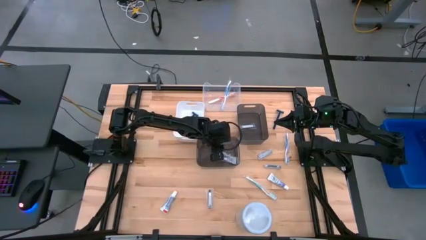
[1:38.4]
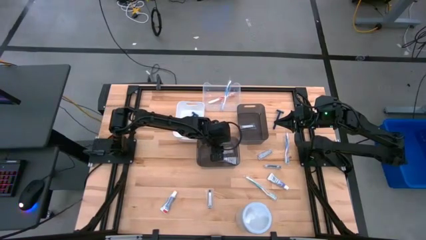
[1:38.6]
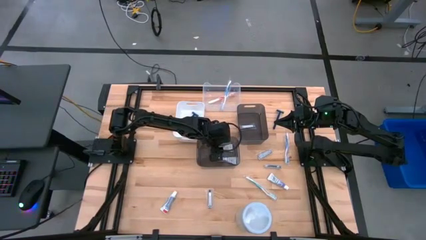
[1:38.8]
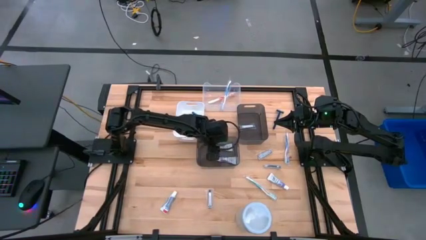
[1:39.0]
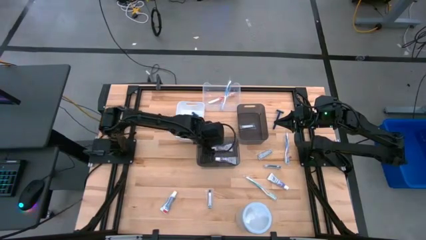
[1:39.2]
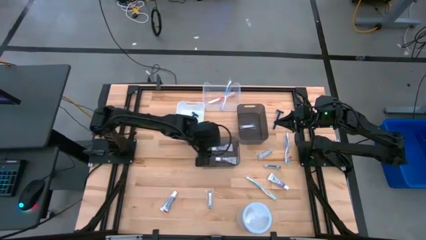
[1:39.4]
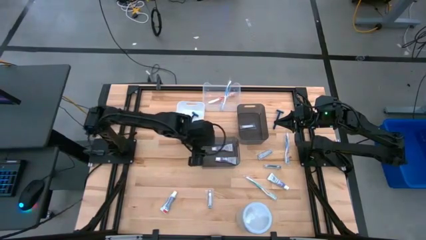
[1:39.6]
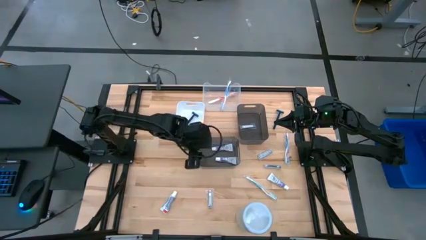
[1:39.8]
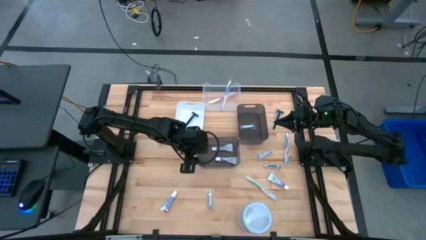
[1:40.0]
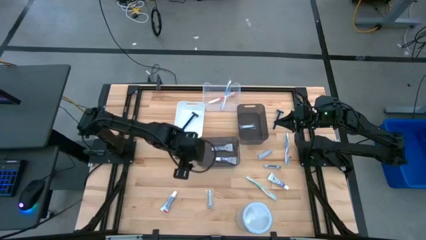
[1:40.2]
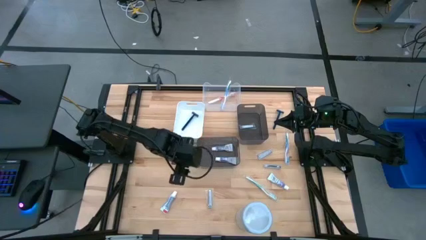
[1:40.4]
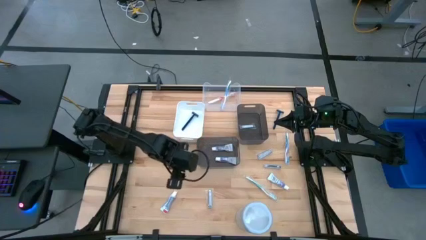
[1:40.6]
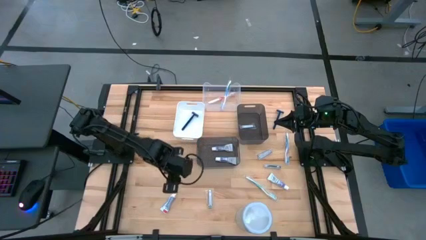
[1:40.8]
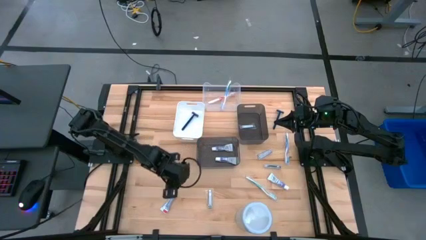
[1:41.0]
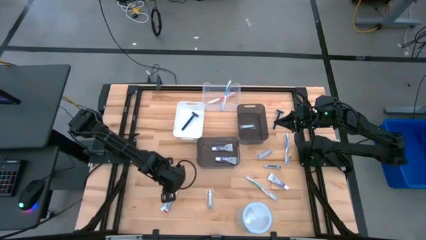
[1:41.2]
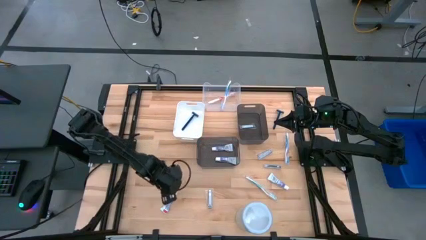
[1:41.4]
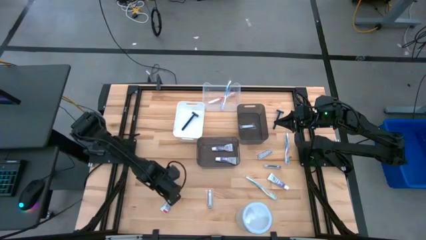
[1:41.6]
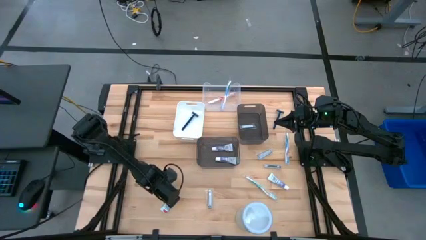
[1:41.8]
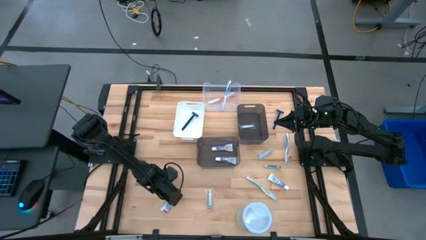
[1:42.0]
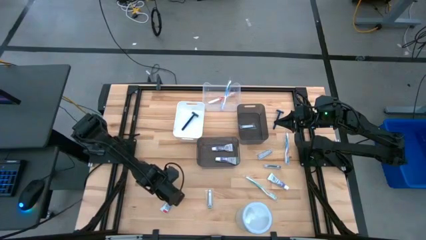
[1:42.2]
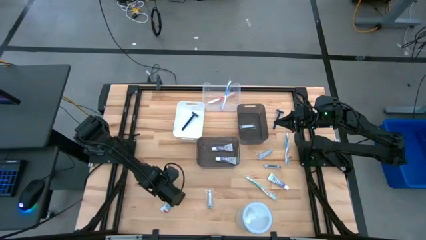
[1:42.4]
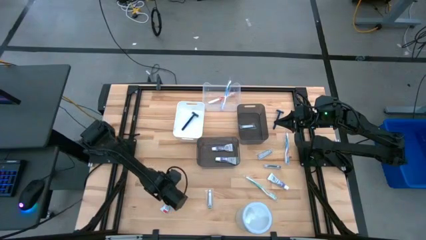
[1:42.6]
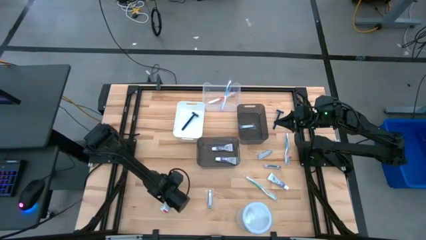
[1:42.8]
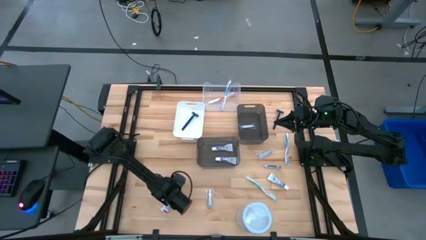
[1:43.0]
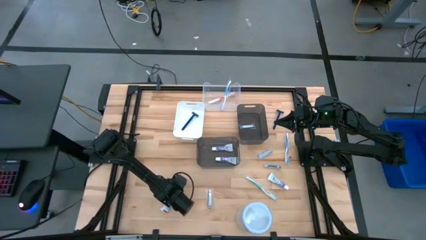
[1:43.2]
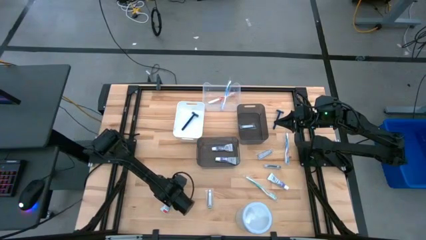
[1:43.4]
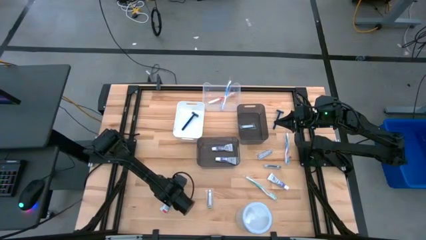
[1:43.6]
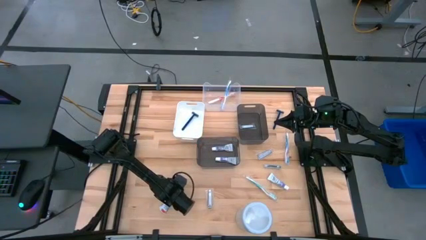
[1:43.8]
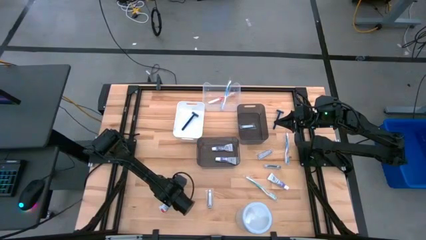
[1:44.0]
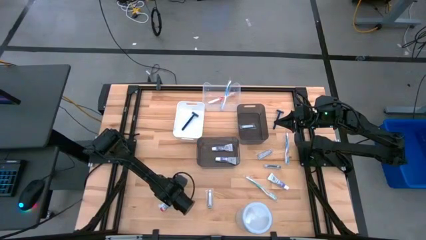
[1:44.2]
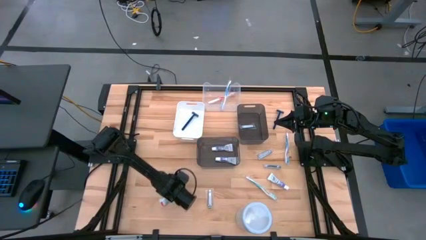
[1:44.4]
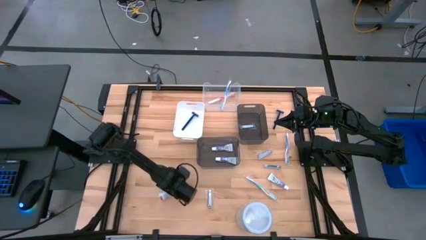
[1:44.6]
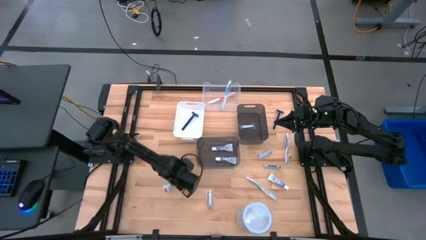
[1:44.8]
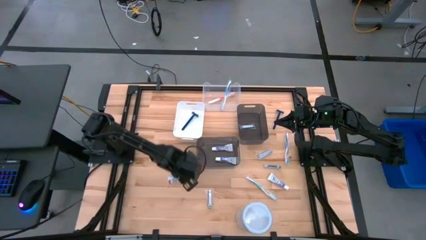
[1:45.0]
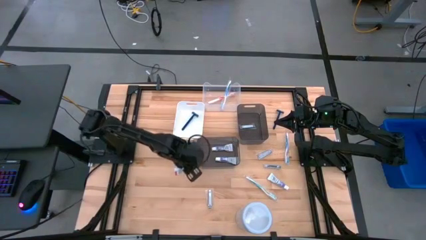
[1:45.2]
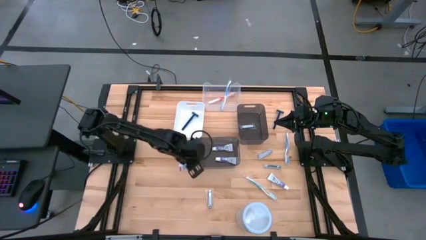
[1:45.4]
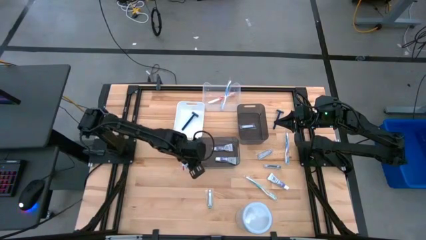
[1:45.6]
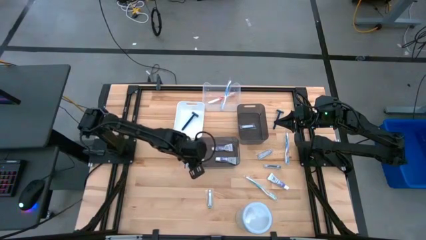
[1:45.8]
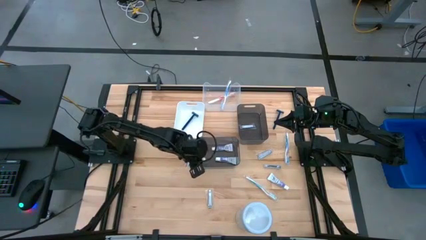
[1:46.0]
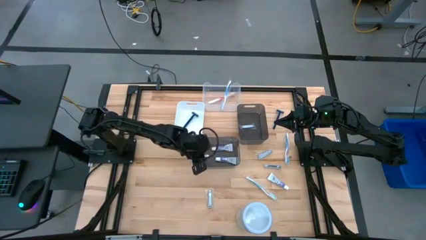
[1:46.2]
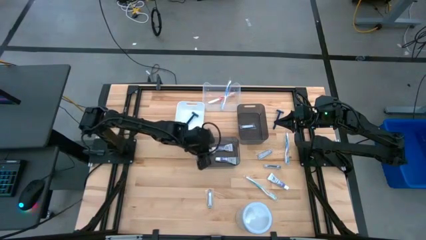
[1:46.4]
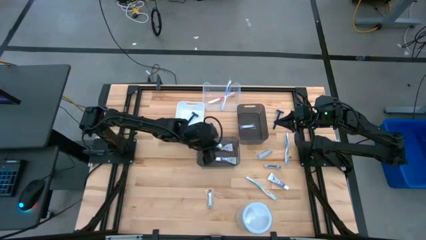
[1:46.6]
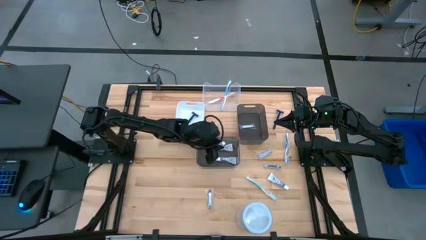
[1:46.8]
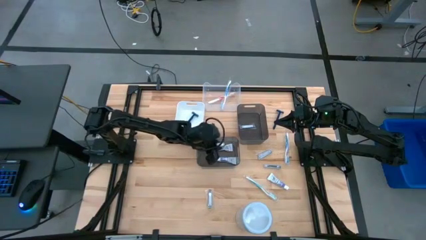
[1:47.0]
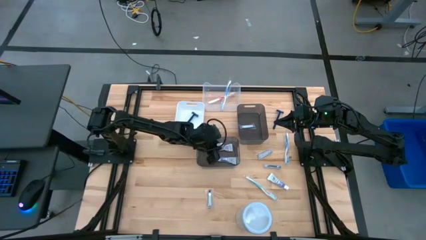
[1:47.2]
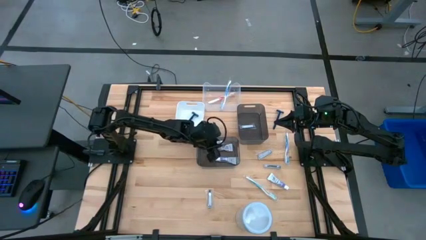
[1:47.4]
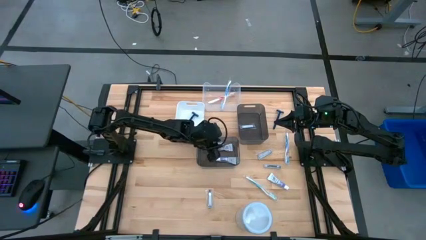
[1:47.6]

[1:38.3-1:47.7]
Task: Pick & Place Travel size toiletries
Put the white toothpaste into the bottom black bin
